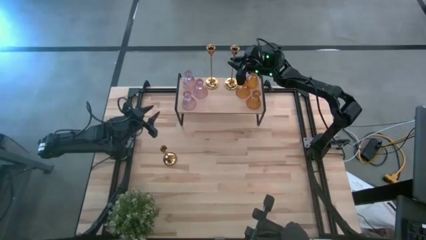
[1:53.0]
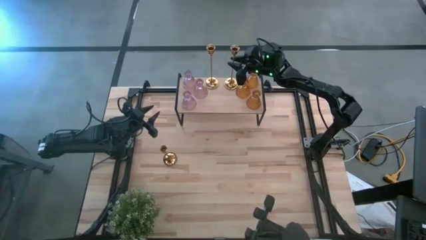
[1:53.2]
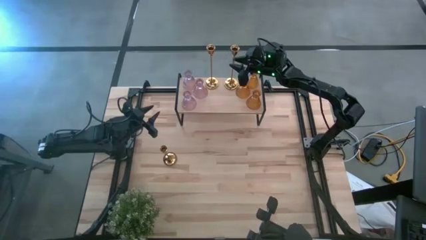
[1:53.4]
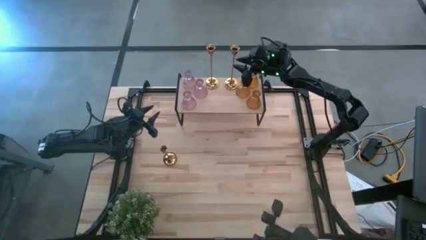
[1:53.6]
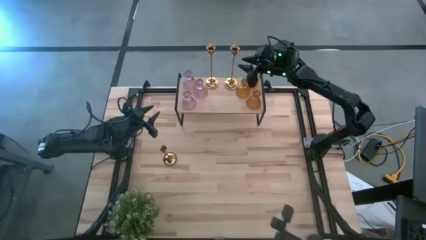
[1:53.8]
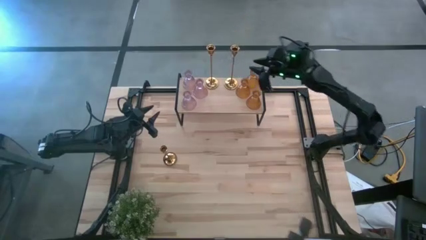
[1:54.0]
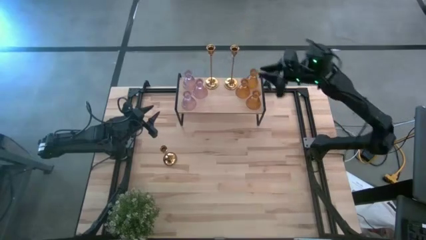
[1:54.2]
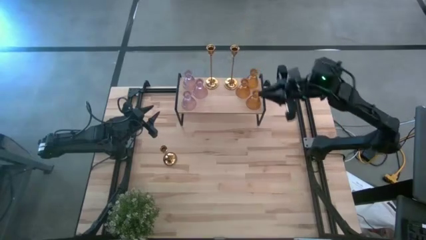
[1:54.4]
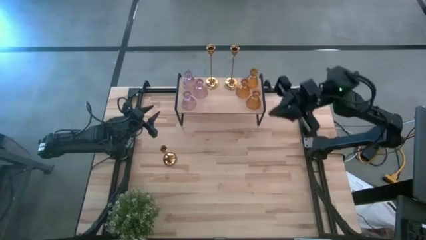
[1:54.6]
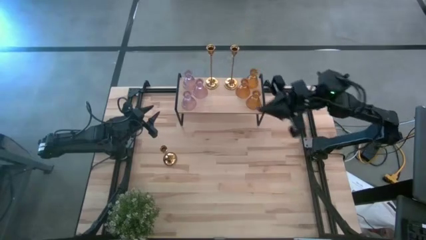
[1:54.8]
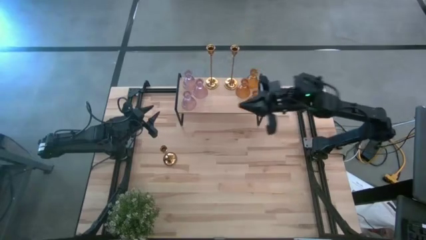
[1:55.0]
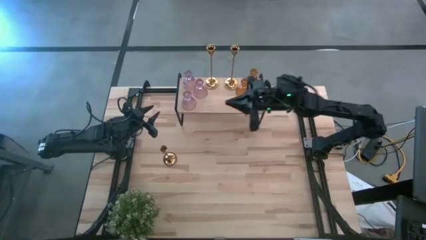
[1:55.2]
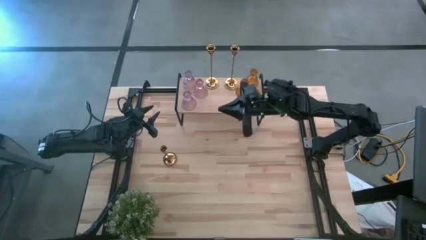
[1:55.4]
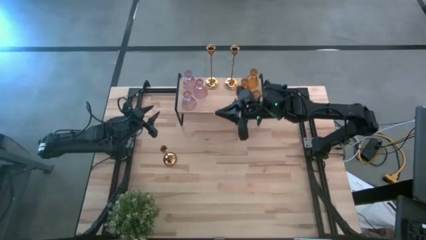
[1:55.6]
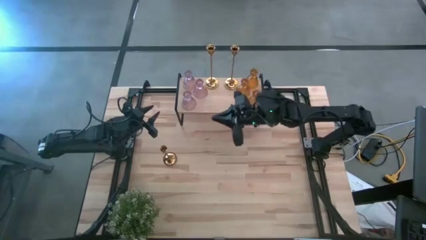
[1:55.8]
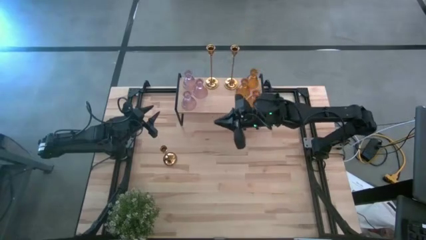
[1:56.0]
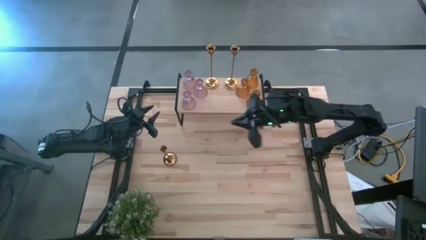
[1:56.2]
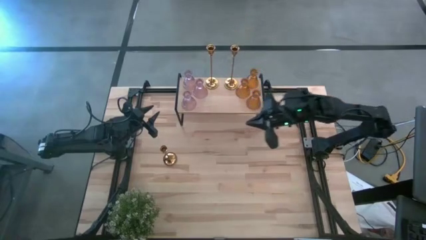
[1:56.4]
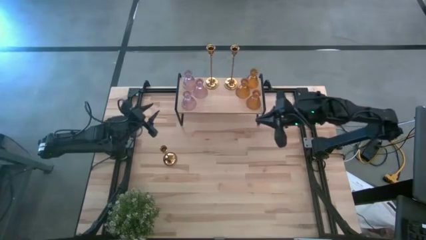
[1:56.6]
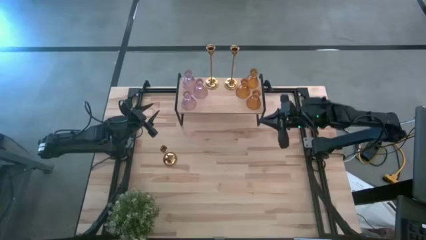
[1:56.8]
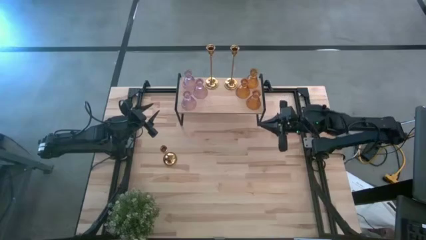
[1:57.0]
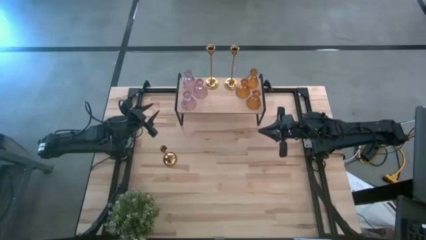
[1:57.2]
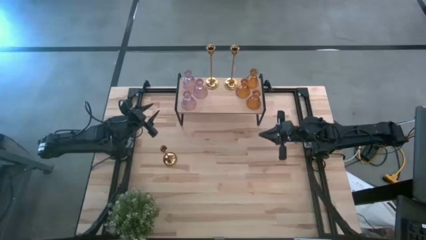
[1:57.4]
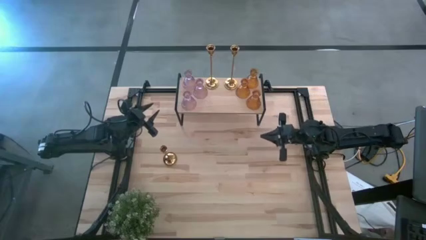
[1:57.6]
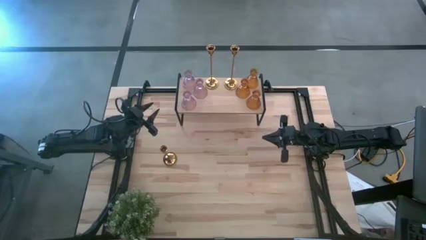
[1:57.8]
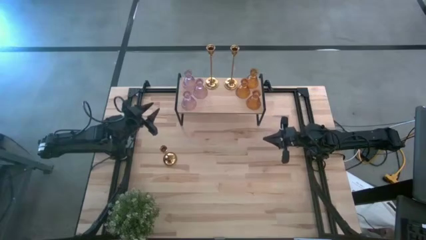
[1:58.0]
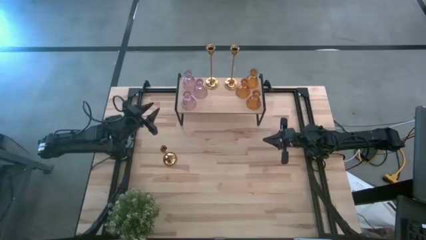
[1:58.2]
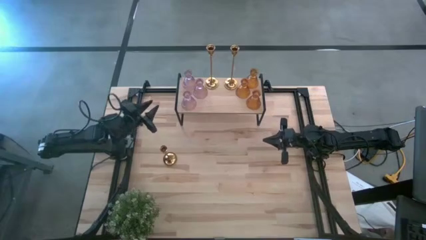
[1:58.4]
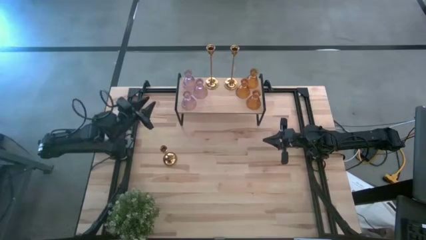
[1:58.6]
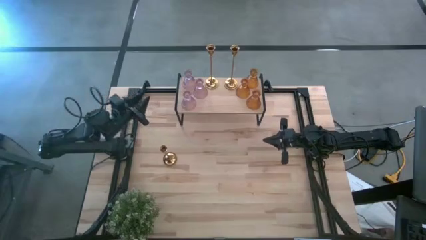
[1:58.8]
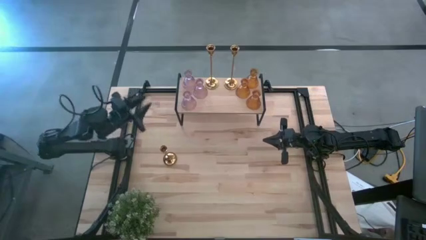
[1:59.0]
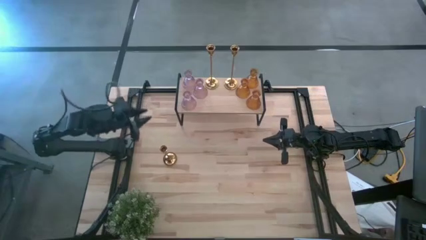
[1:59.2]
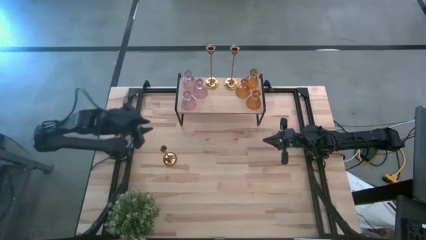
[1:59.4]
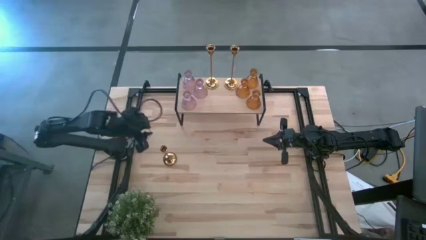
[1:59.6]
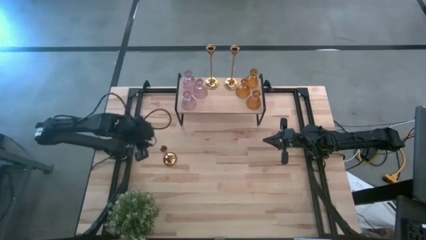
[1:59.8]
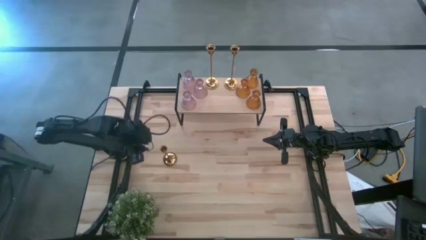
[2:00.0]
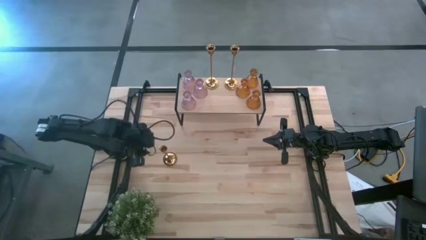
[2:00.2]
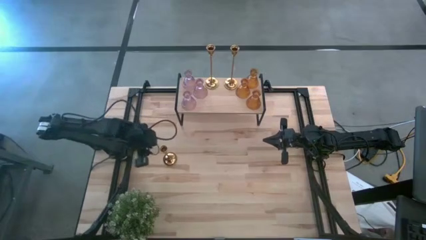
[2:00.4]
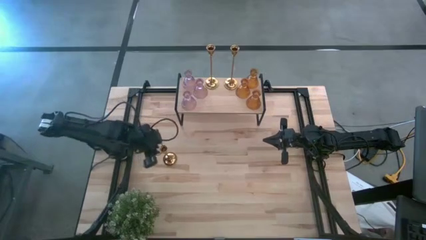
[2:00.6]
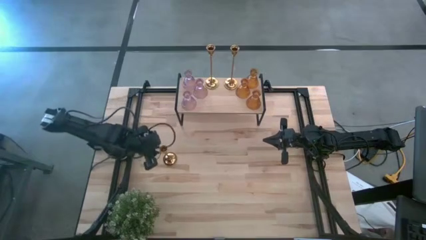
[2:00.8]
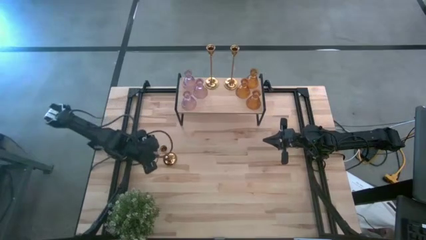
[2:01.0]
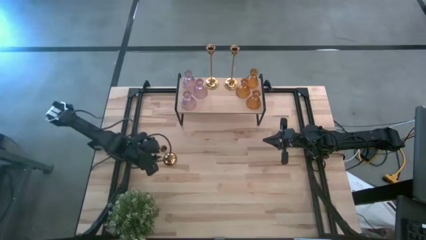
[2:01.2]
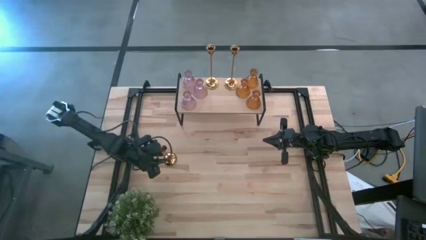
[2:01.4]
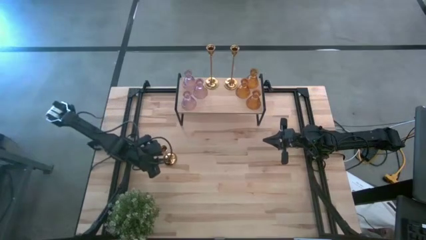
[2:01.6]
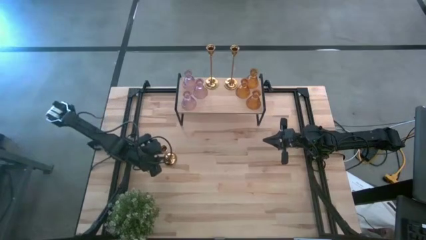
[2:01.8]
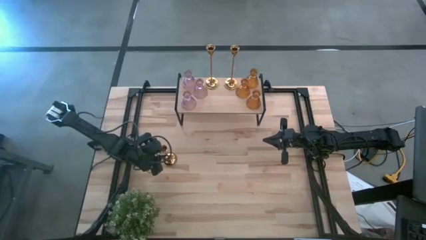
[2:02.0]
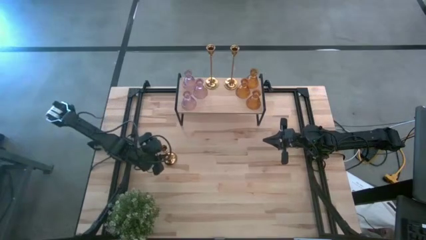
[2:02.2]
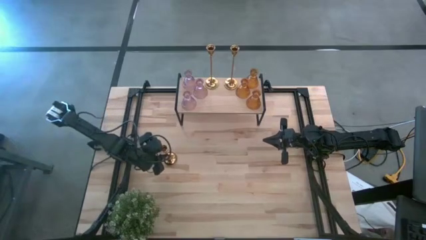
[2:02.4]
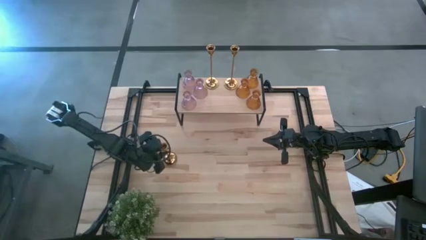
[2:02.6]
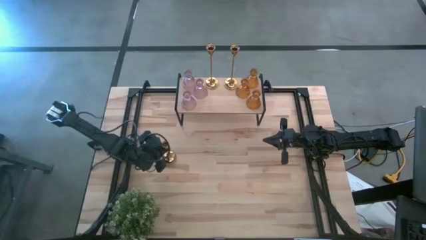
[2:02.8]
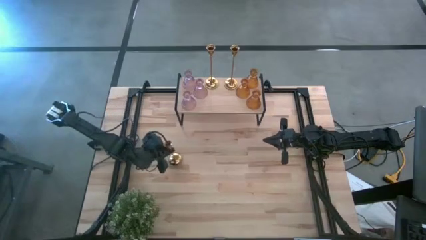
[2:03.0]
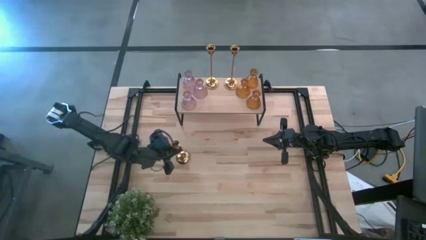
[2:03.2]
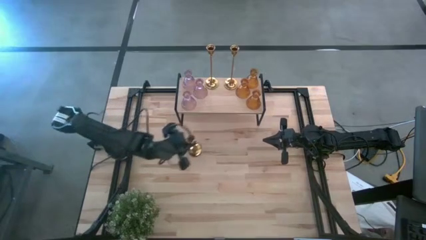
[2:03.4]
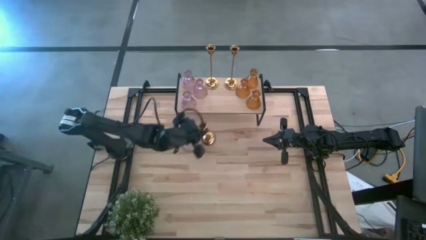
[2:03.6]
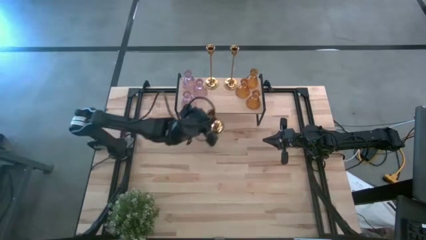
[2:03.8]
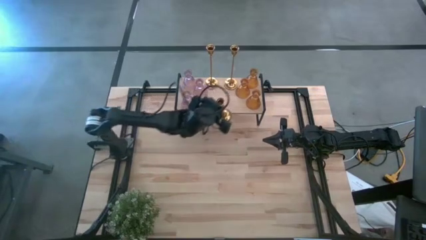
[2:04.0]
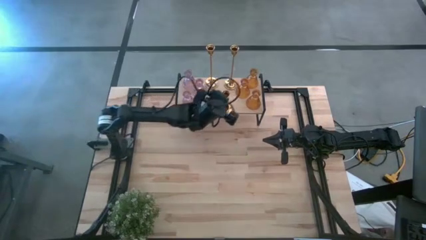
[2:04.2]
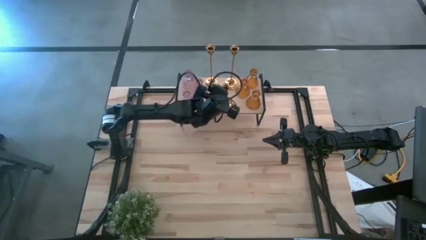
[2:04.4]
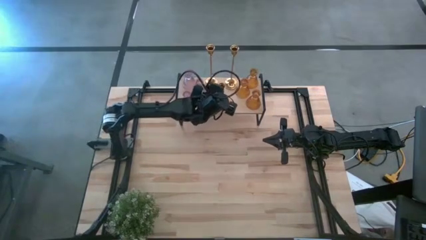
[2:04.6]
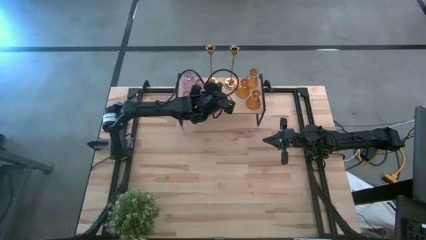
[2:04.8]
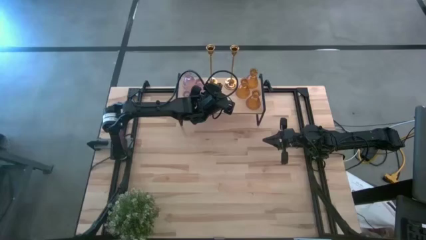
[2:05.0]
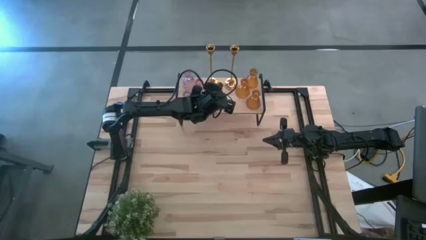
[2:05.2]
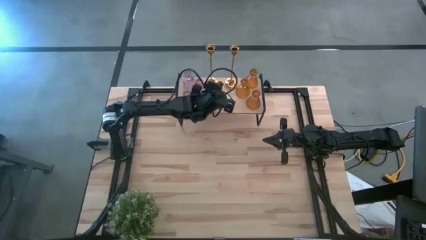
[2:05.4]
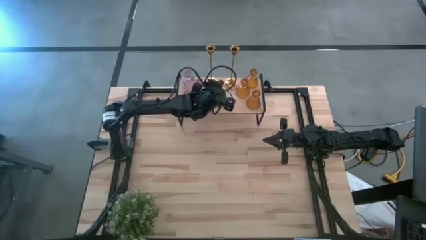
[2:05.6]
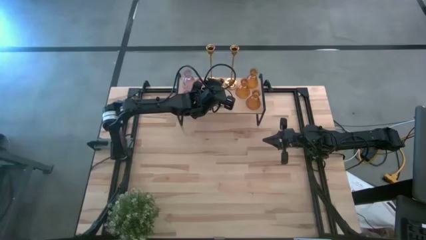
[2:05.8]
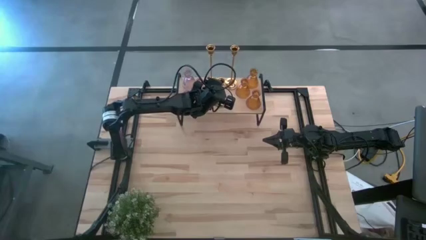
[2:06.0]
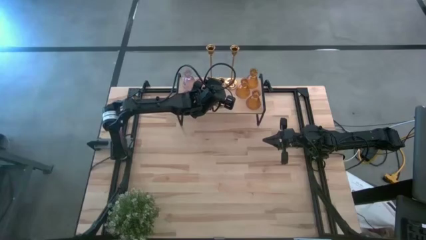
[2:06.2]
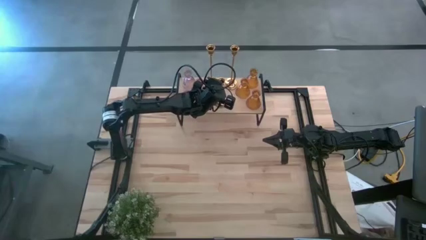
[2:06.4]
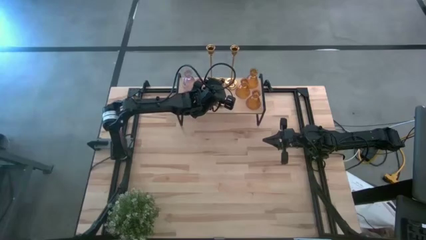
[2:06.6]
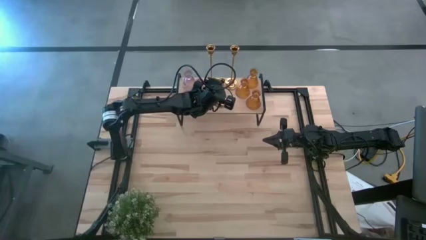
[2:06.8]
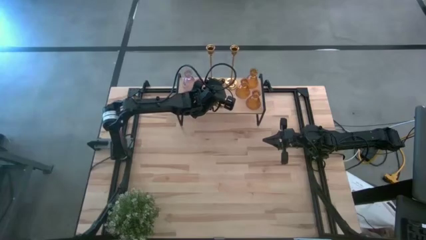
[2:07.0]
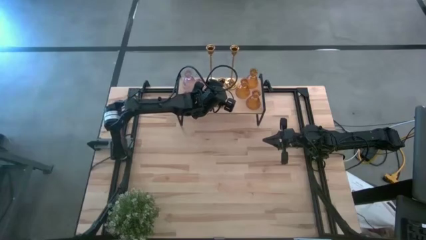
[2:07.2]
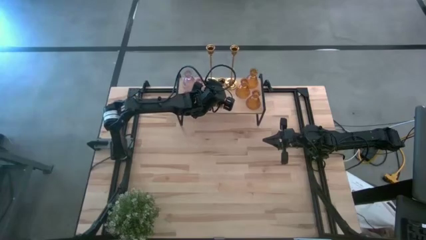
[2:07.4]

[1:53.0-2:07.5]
Task: Pick & Place candle stick holders
Put the golden metal candle holder on the shelf

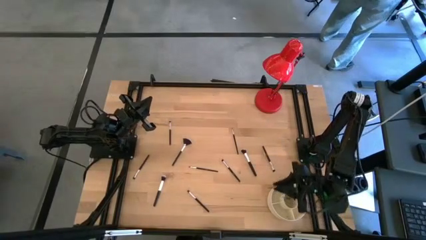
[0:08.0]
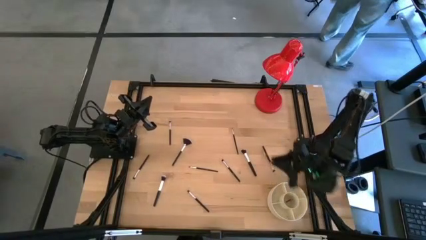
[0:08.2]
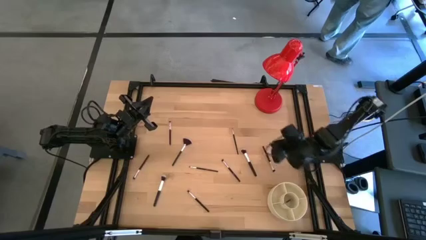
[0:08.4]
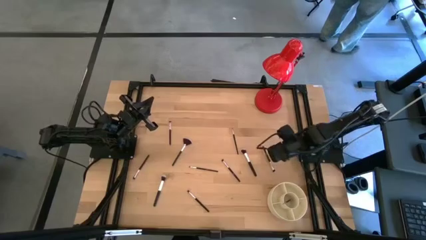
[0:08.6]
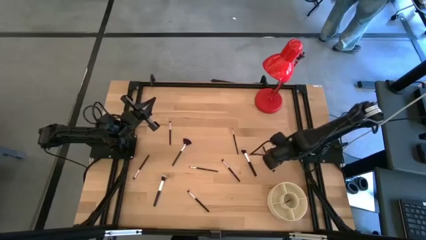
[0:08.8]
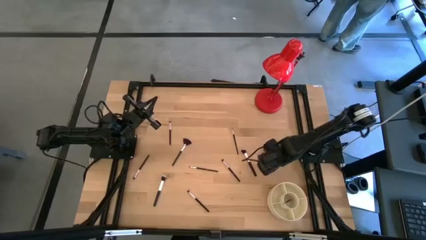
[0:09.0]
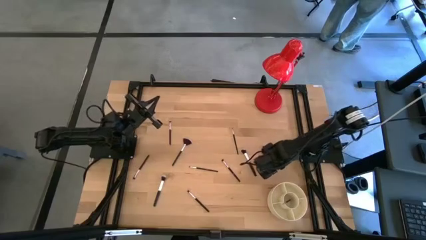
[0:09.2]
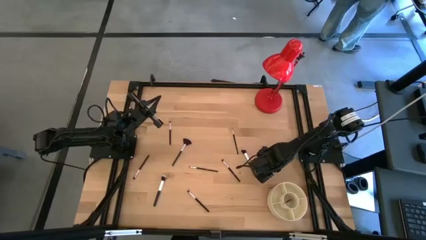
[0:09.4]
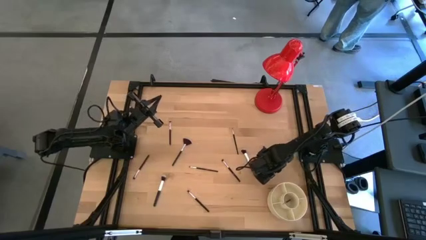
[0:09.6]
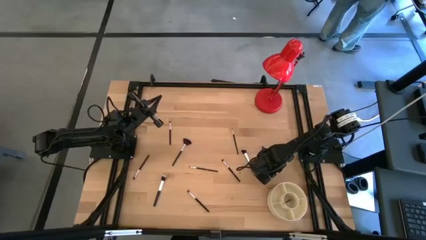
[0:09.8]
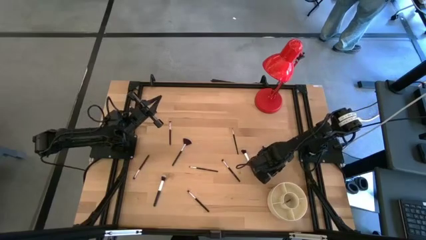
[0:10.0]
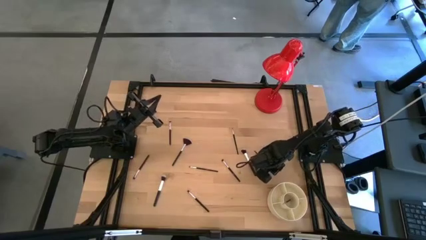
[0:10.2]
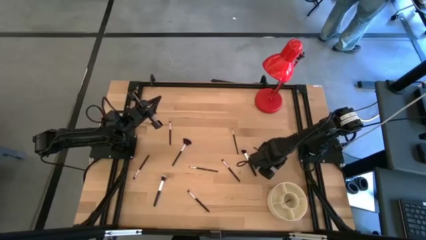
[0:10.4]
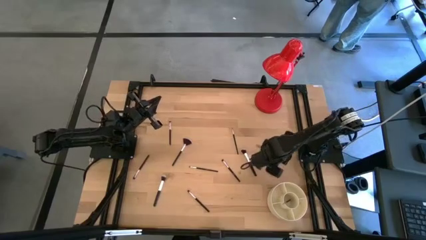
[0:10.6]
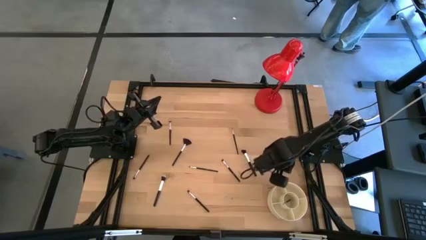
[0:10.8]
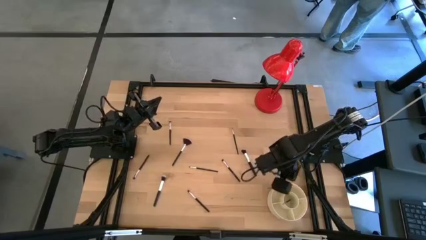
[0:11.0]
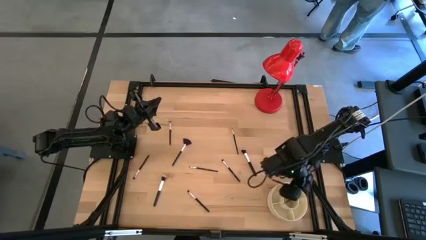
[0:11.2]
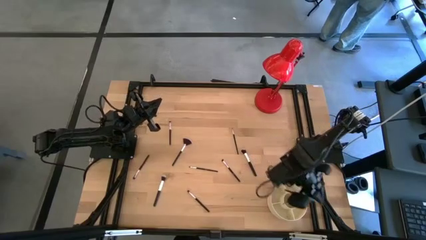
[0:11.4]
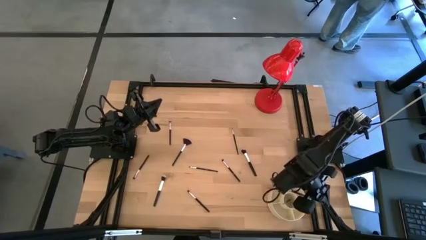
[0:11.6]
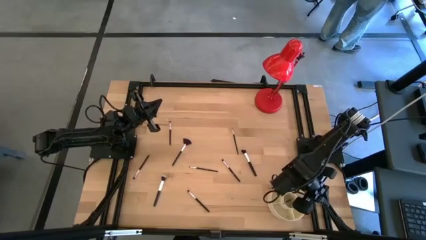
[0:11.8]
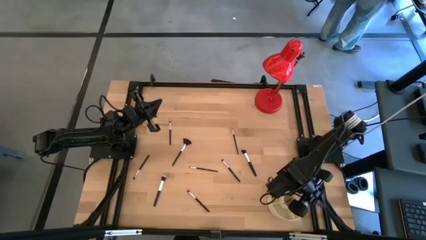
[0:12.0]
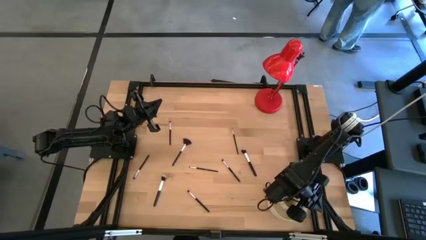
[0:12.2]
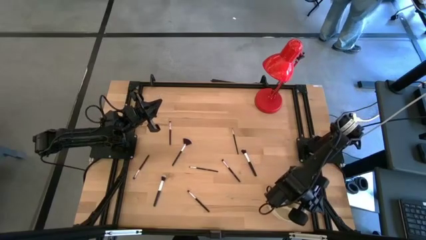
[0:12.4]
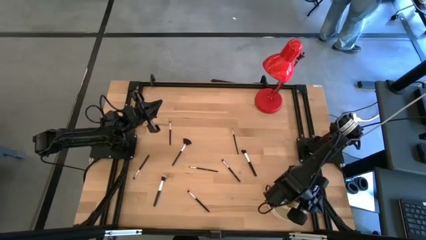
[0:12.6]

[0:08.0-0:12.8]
Task: Put items in baskets/containers
Put the black eyeshadow brush into the yellow pen organizer
